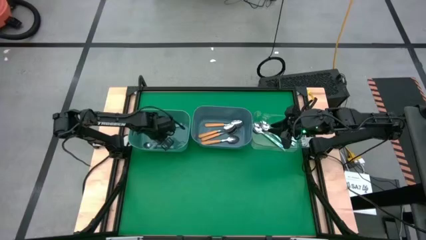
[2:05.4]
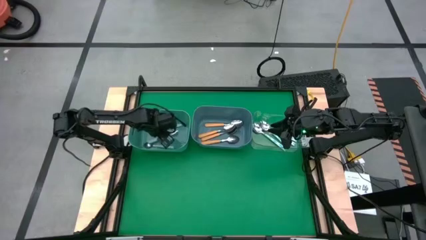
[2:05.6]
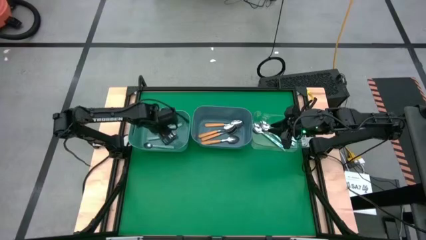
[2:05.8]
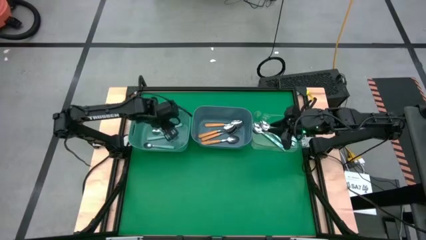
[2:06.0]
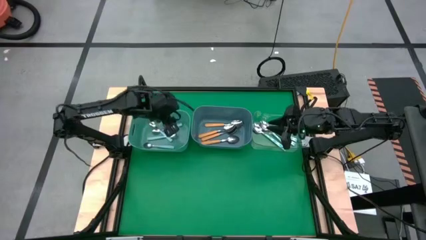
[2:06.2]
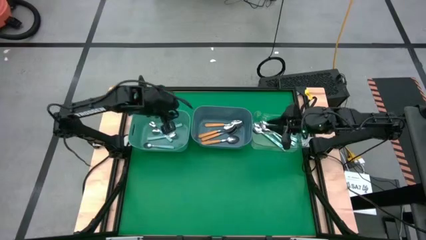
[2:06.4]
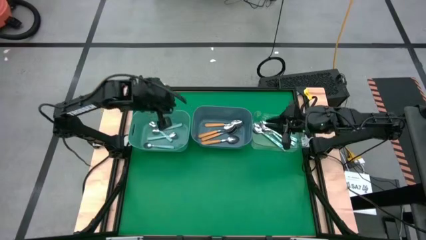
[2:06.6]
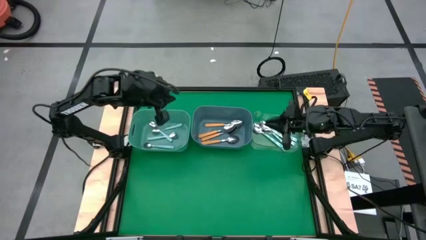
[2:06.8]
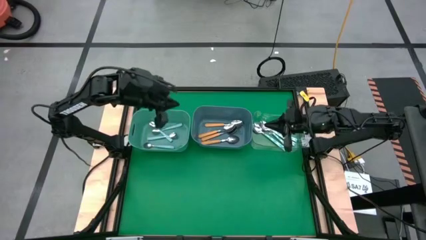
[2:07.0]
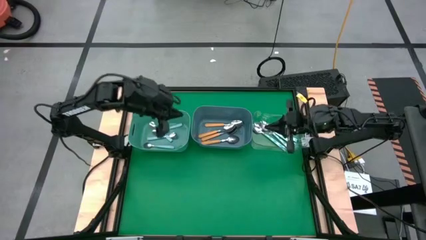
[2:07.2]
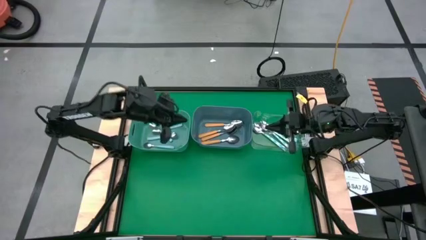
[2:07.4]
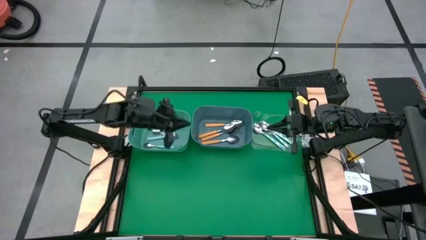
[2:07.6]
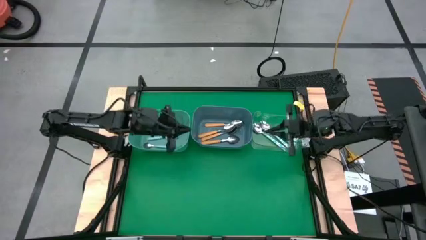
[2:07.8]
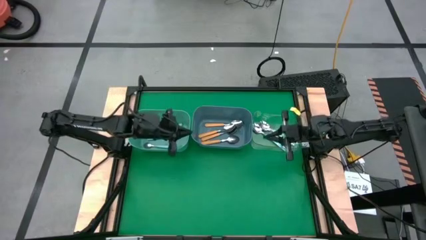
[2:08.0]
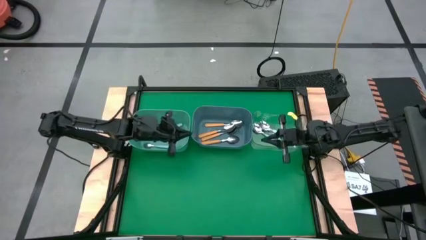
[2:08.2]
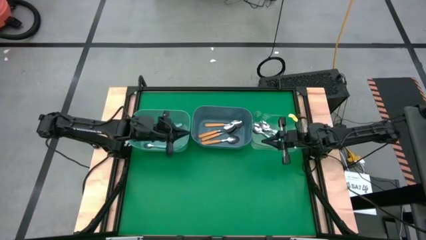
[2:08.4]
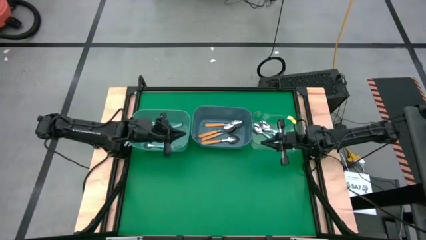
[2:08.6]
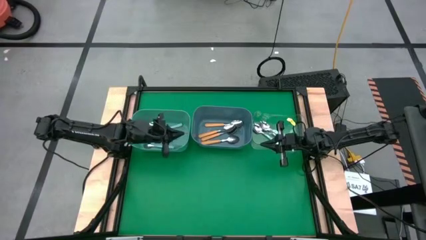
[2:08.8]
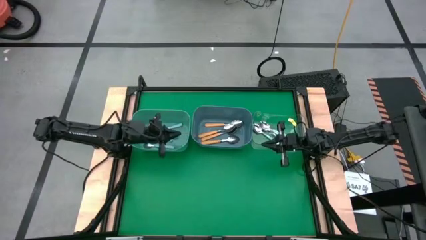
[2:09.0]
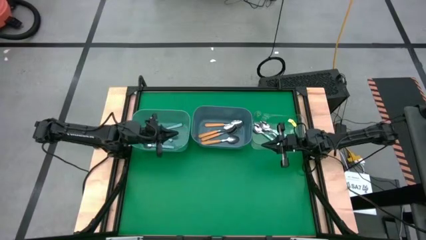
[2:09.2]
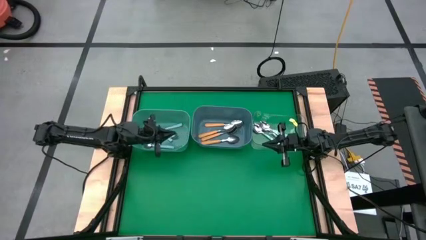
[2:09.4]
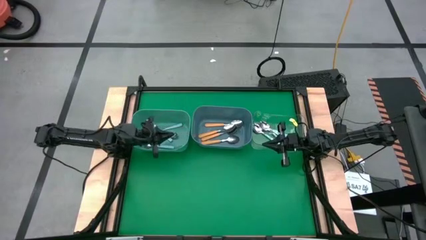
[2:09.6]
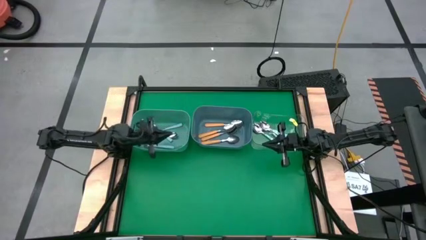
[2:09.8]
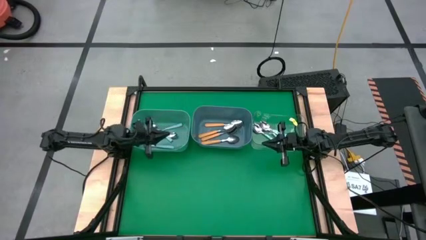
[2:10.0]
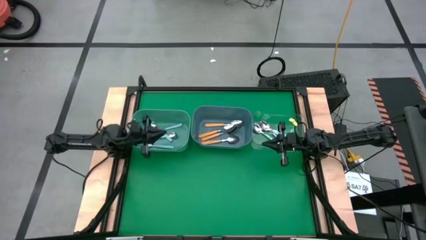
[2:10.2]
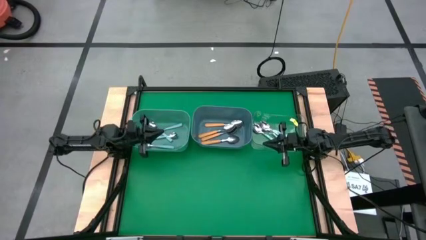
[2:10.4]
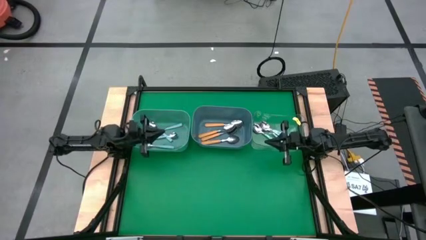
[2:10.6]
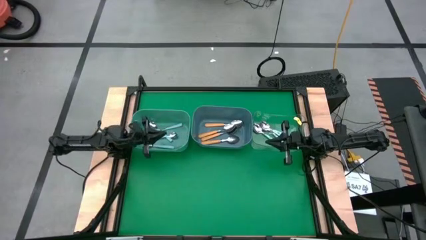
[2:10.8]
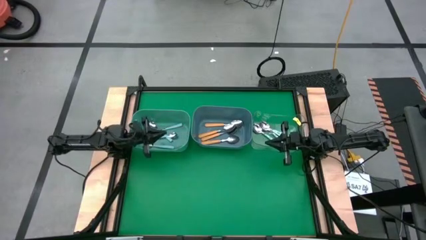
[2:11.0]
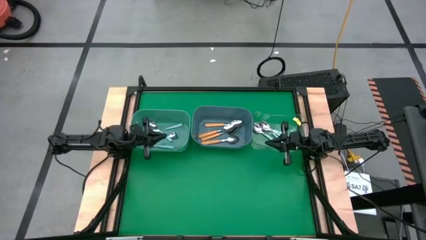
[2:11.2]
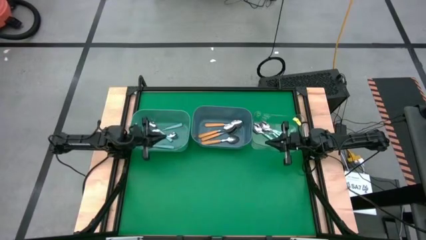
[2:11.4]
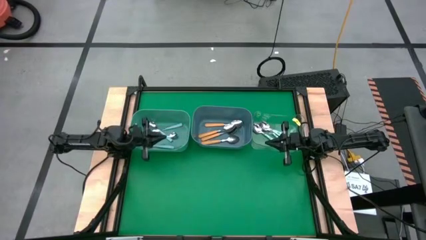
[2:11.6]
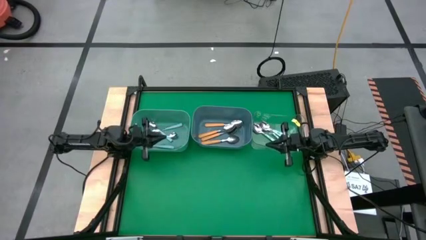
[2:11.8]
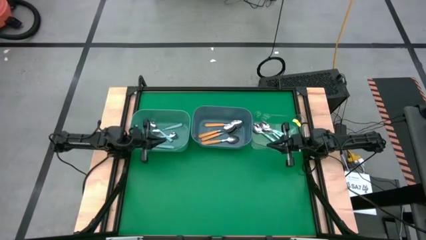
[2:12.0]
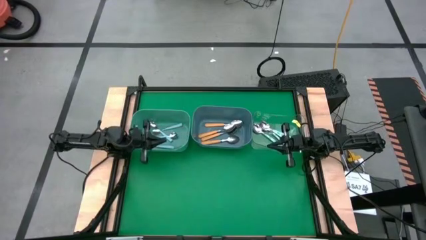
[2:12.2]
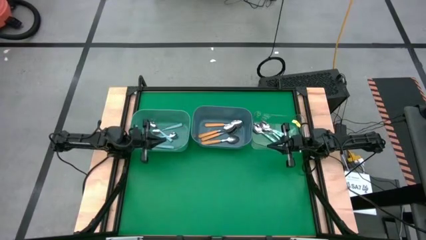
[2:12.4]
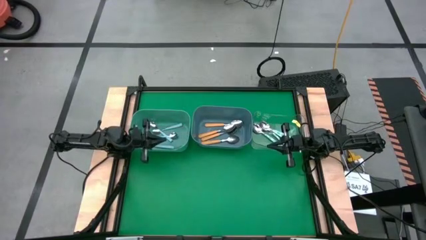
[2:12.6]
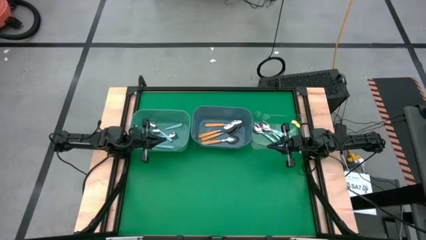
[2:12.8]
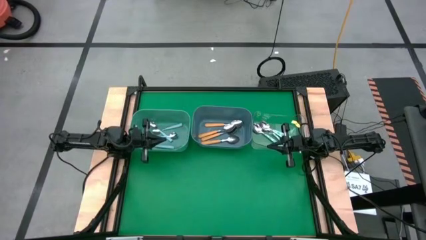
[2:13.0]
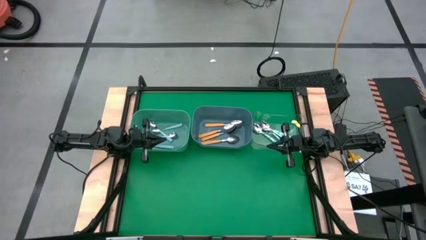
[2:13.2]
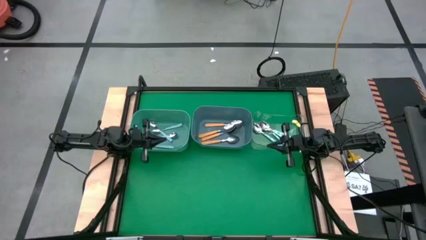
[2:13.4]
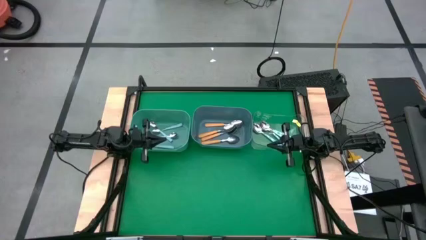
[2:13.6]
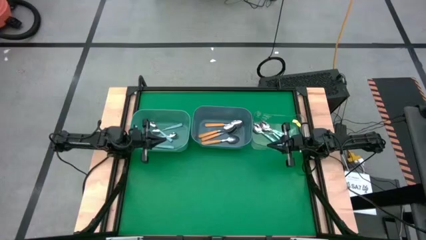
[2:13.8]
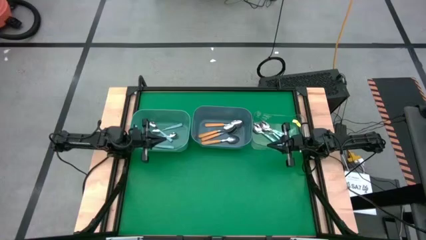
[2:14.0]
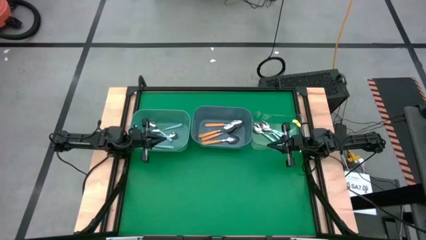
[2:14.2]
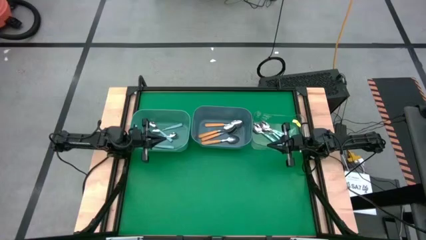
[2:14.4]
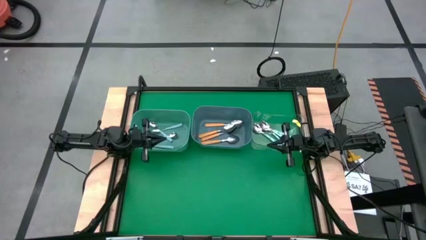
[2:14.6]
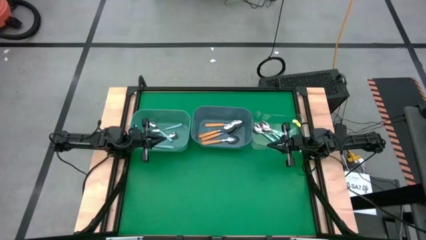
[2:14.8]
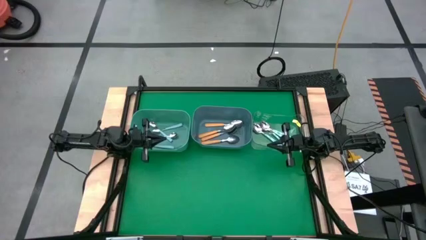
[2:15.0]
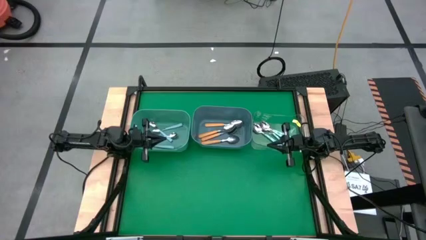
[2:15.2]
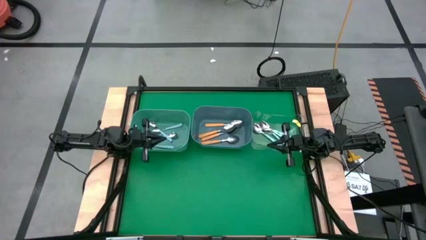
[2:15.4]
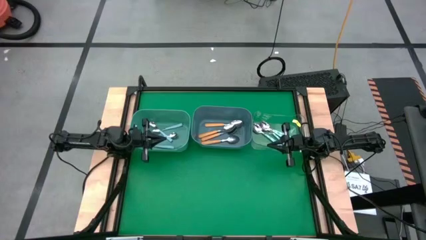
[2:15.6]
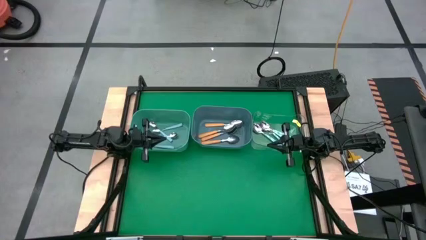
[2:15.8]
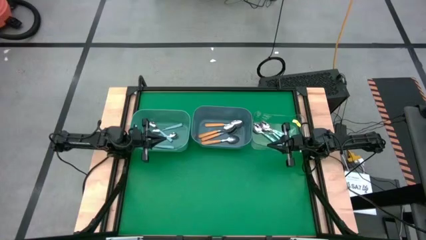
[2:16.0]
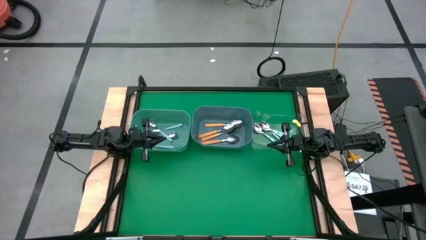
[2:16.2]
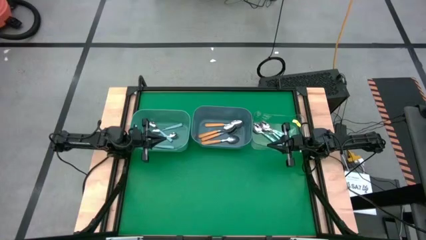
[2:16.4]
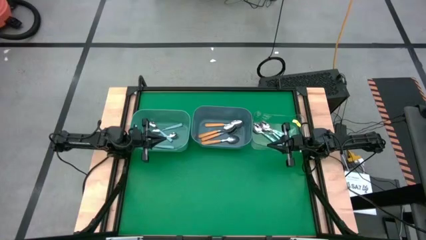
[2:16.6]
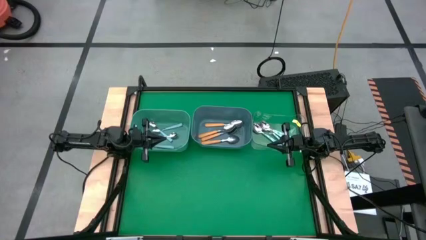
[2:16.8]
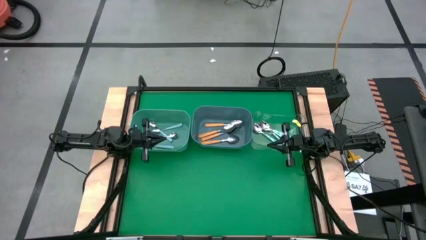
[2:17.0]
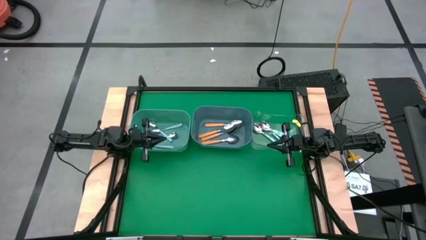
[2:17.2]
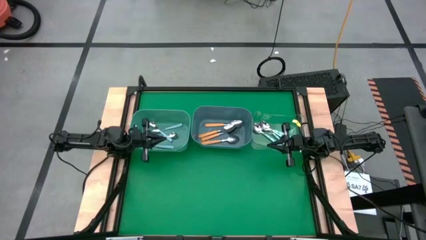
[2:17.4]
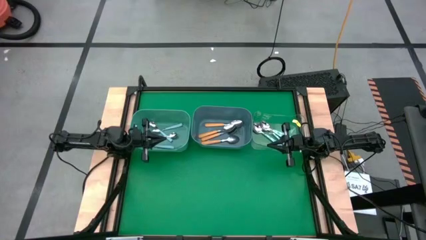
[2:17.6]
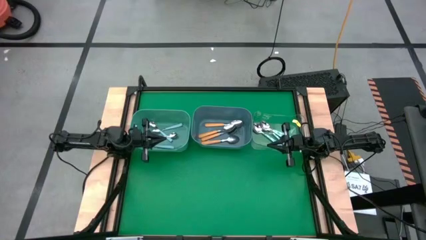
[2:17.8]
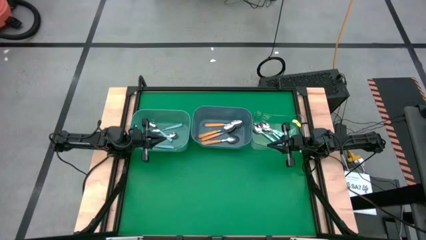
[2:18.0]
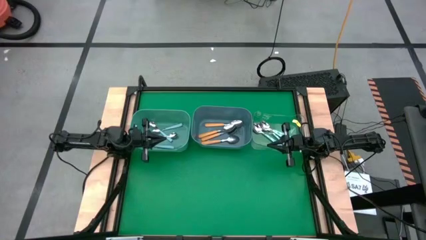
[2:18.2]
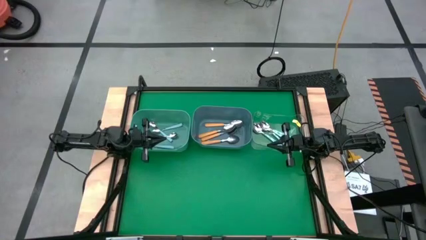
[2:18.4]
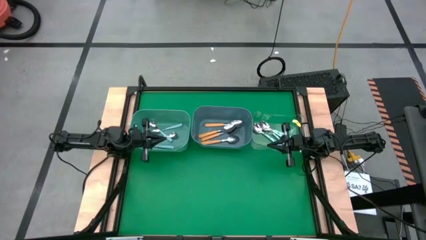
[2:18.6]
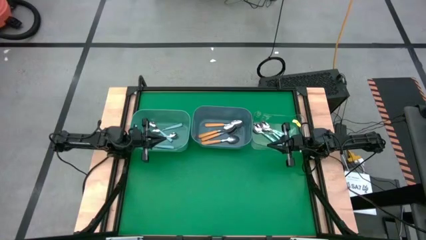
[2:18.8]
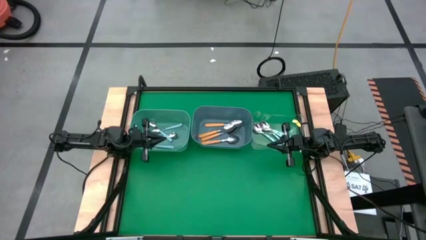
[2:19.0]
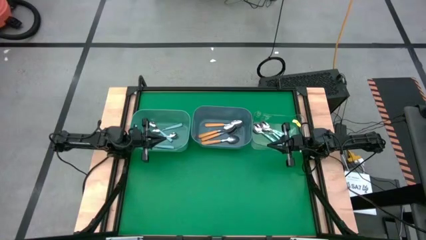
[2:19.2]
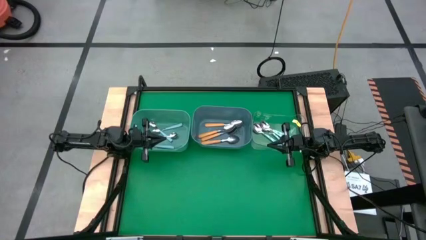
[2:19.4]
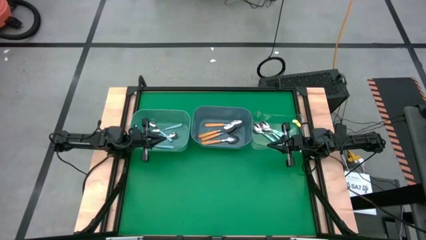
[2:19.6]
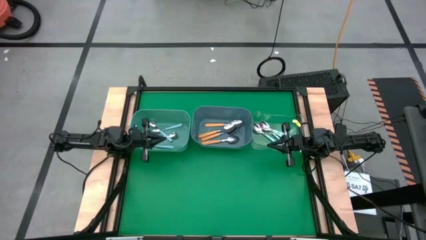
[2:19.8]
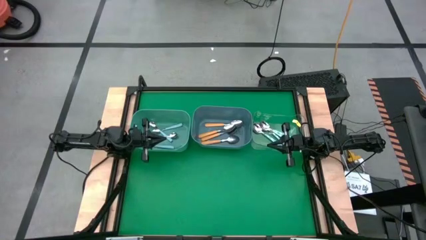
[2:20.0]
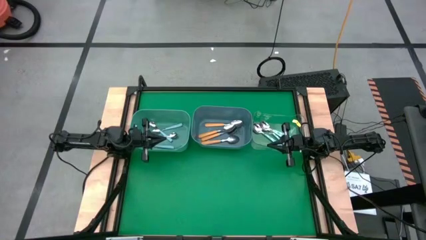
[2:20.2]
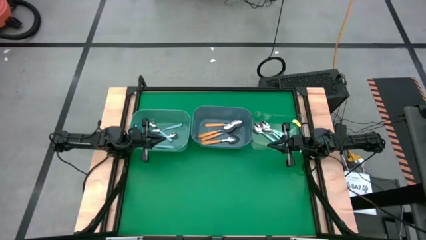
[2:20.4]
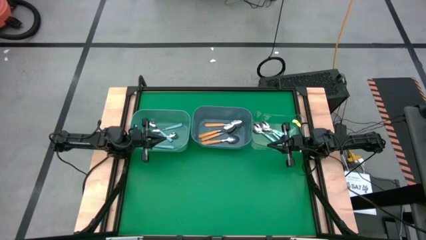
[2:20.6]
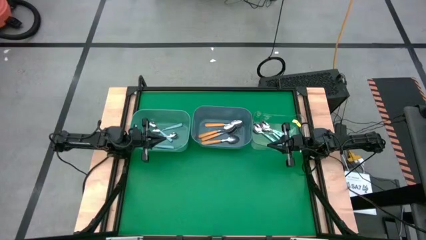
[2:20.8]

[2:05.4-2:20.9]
Task: Sort silverware by color (type)
Return to Home Position

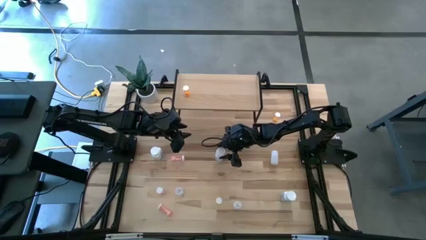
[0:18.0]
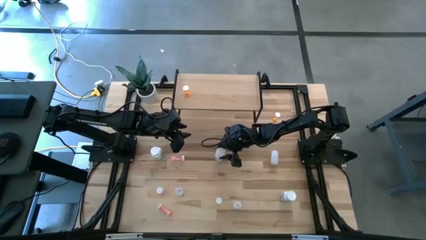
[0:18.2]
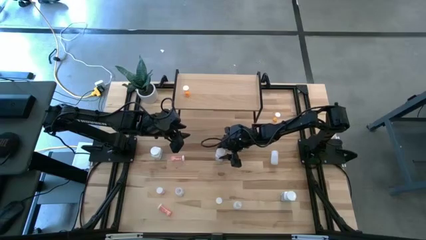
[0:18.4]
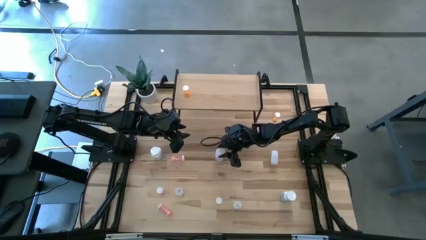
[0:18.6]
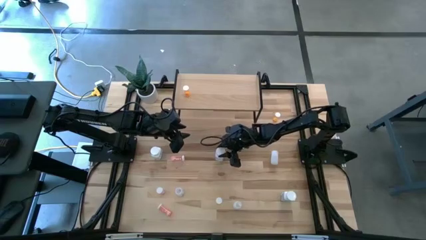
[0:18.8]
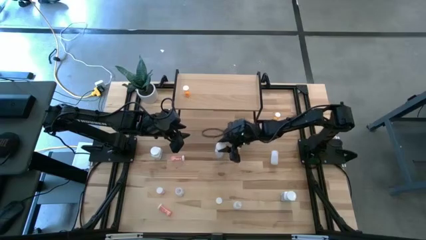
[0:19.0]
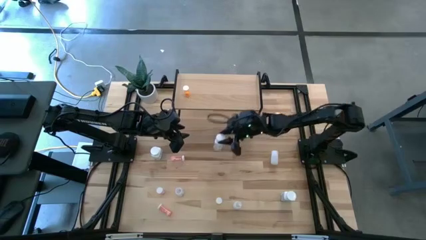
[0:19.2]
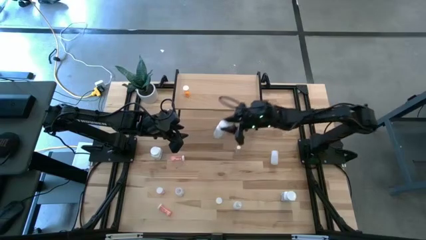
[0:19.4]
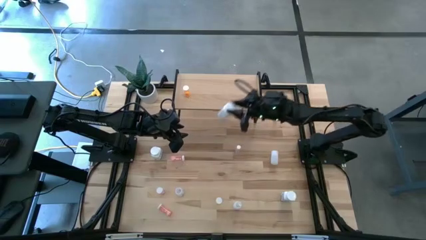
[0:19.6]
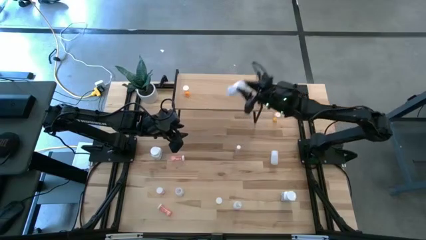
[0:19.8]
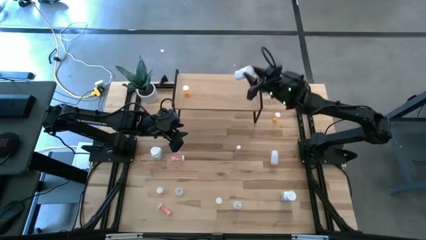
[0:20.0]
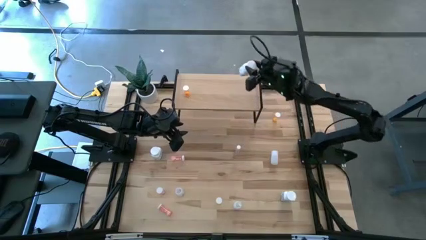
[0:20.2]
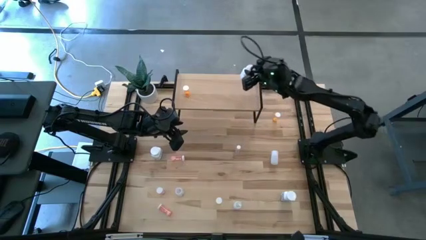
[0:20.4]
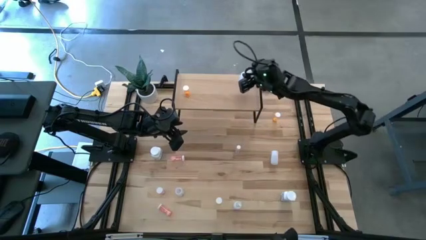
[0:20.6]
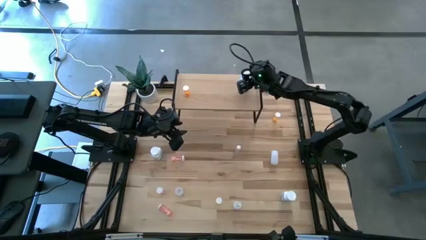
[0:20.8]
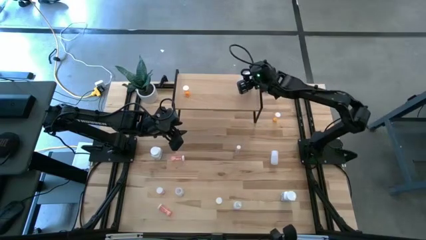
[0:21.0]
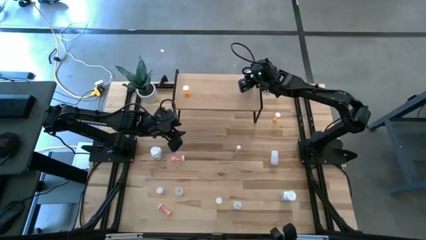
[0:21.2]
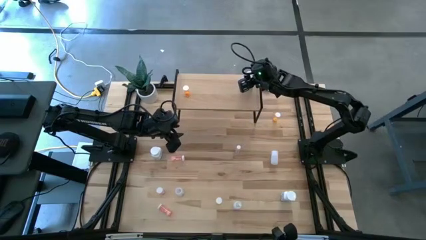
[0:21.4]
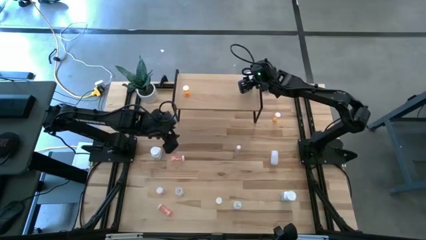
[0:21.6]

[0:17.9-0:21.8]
Task: Pick and place medicine bottles onto shelf by color
Put the top blue pill bottle on the shelf
